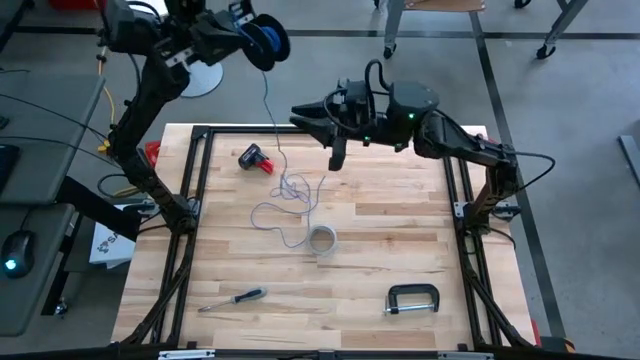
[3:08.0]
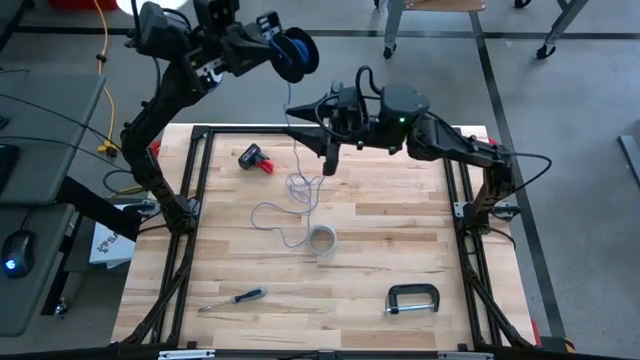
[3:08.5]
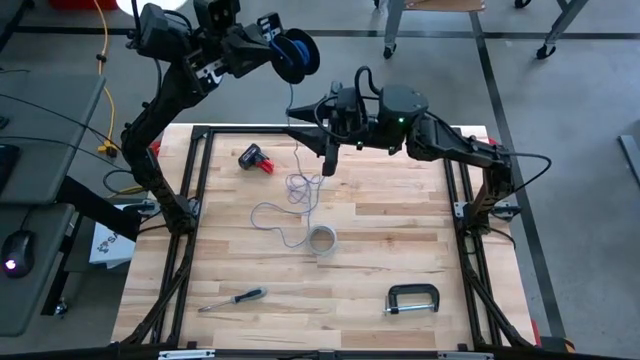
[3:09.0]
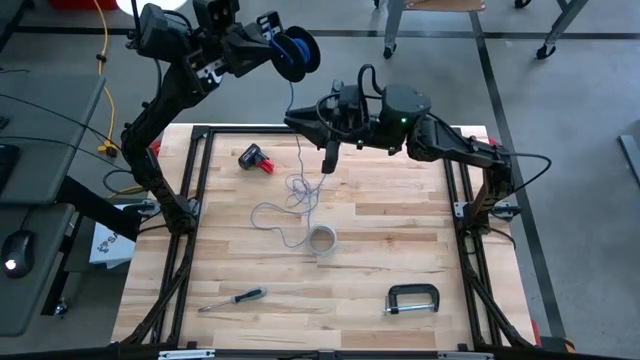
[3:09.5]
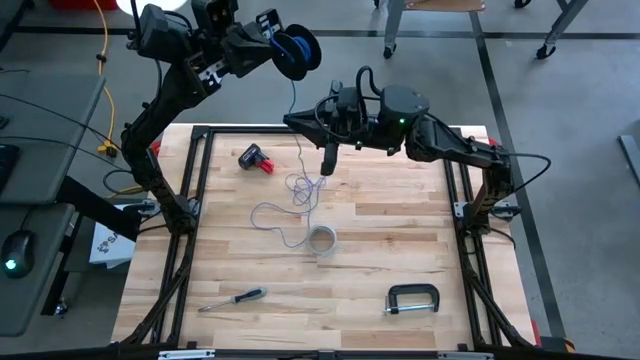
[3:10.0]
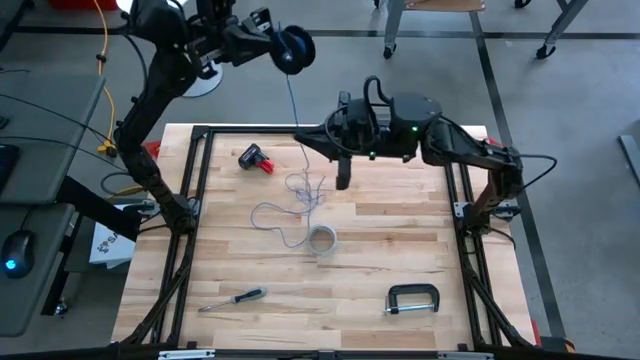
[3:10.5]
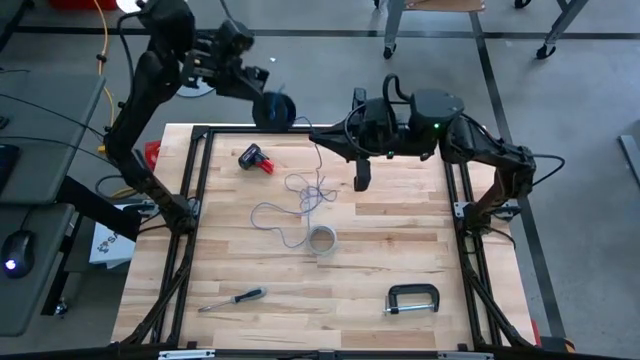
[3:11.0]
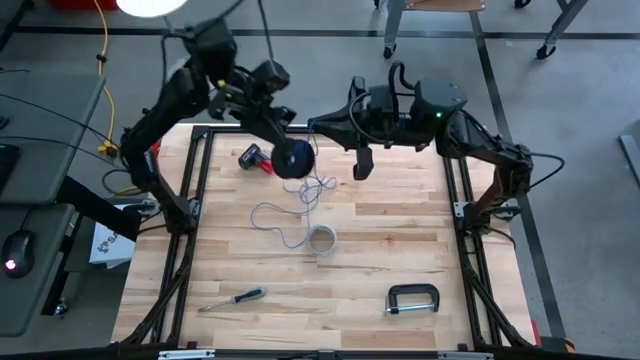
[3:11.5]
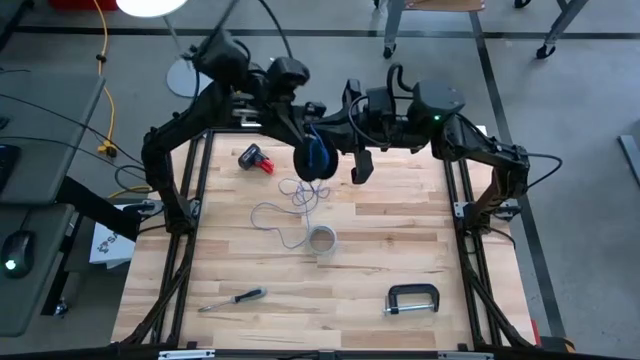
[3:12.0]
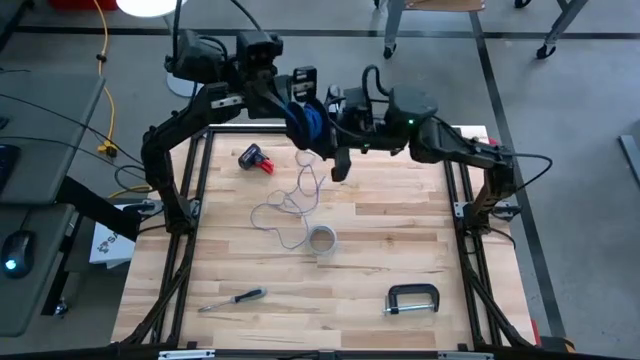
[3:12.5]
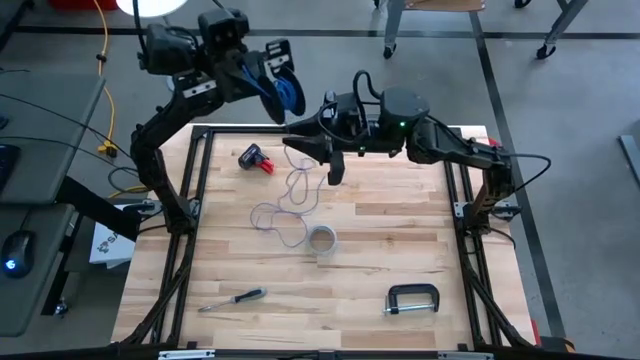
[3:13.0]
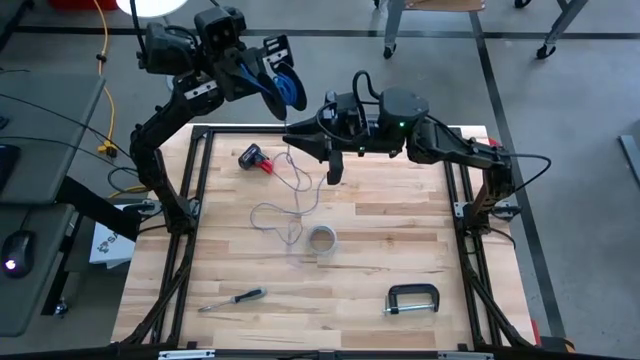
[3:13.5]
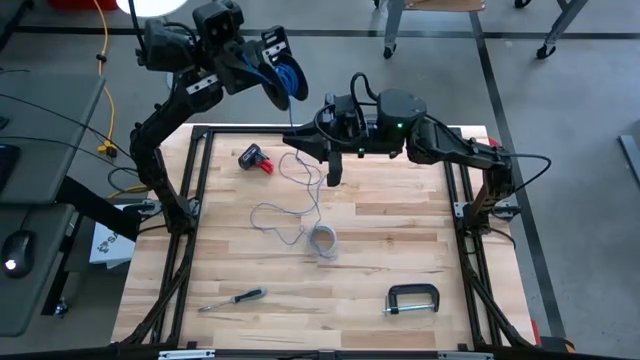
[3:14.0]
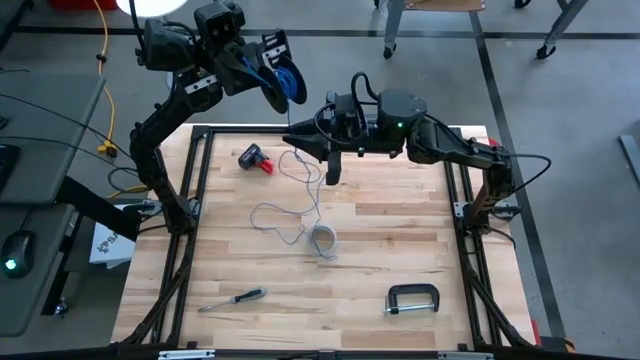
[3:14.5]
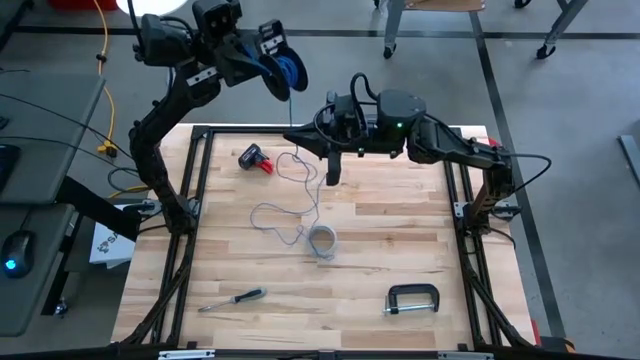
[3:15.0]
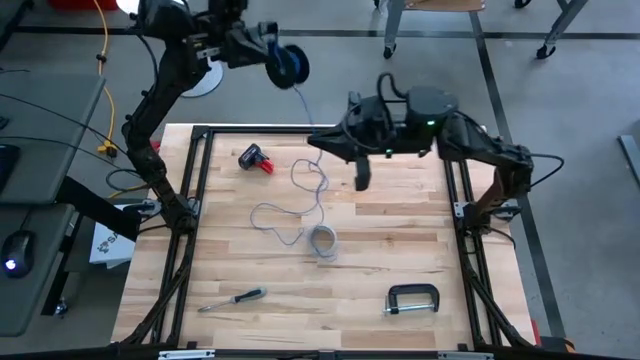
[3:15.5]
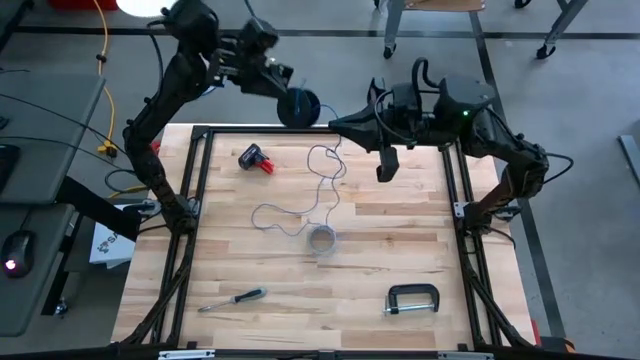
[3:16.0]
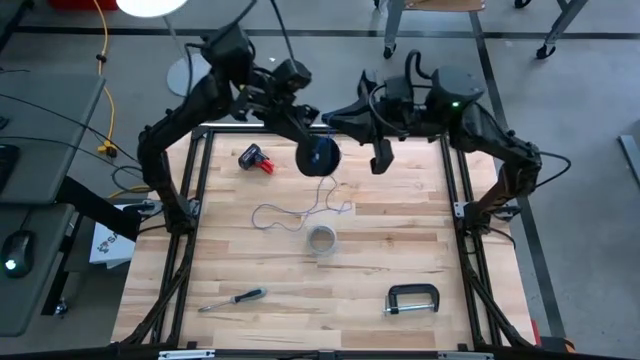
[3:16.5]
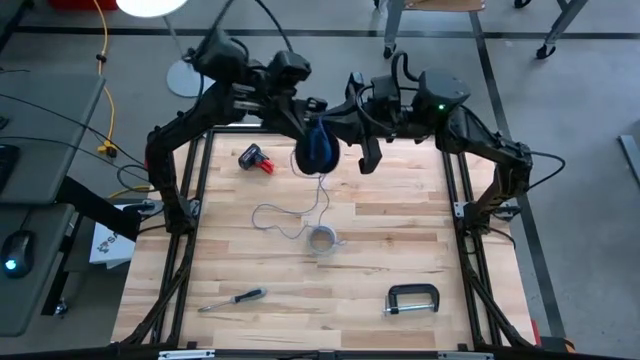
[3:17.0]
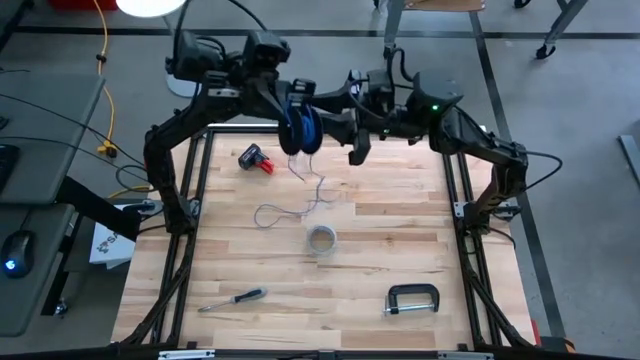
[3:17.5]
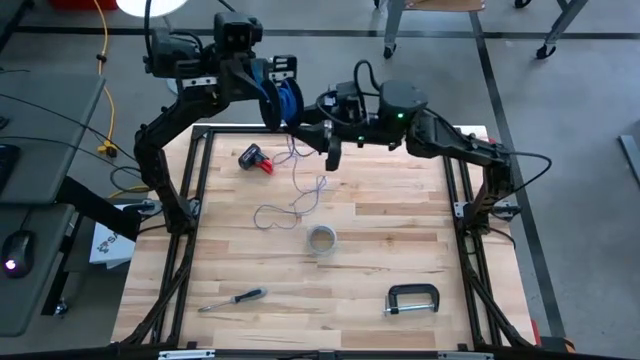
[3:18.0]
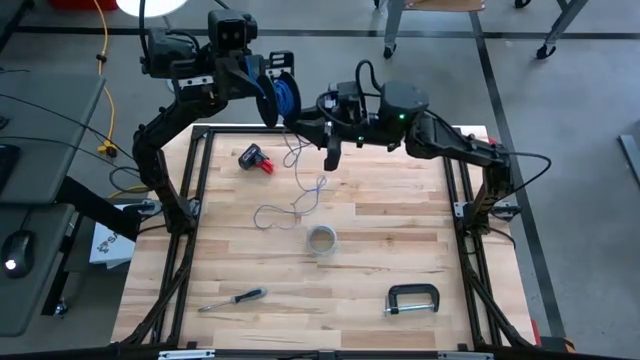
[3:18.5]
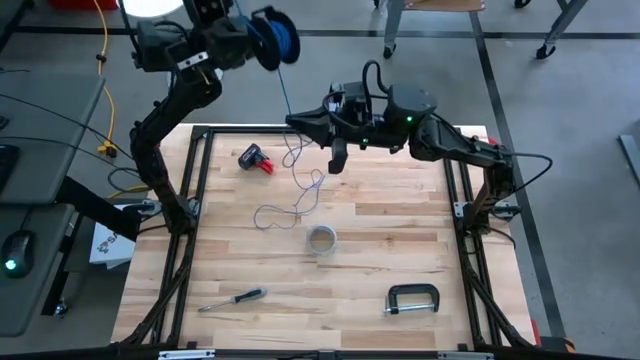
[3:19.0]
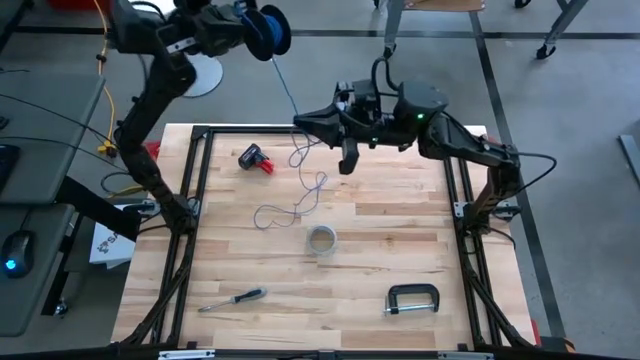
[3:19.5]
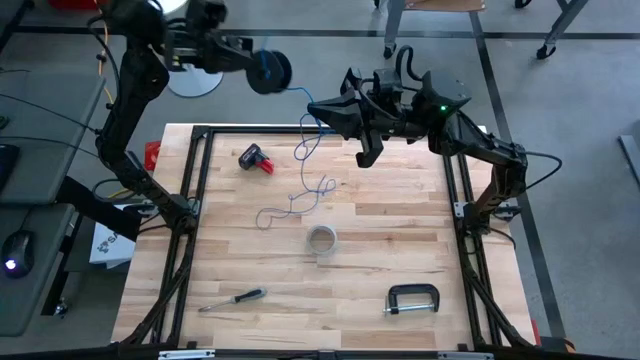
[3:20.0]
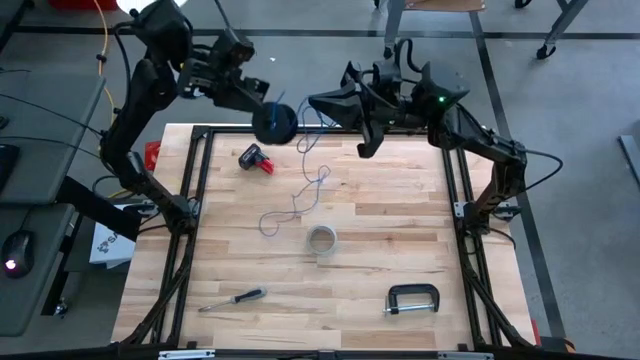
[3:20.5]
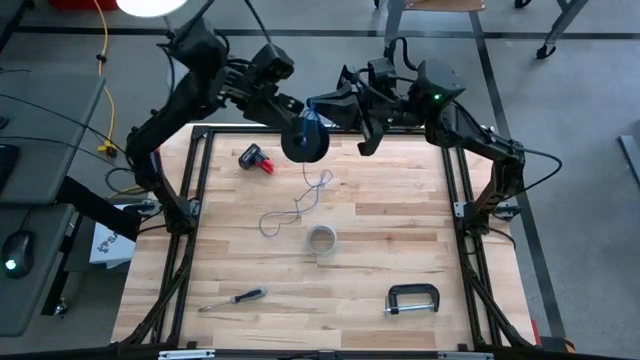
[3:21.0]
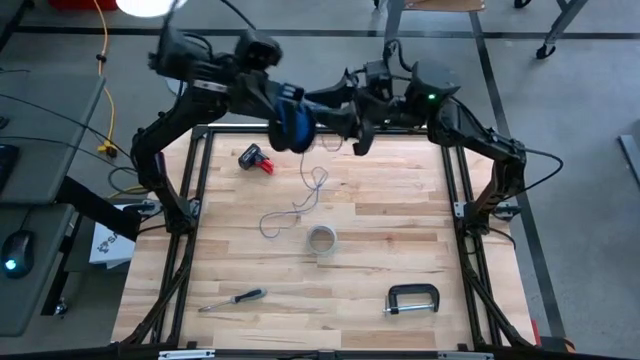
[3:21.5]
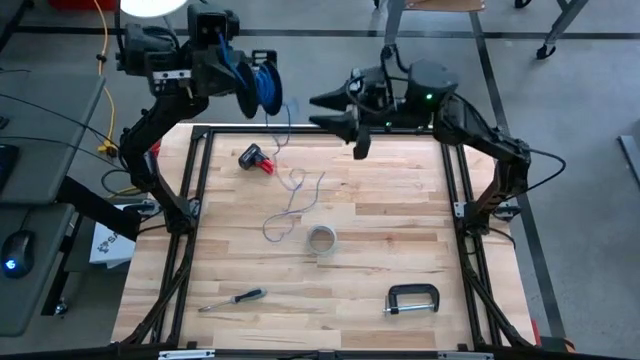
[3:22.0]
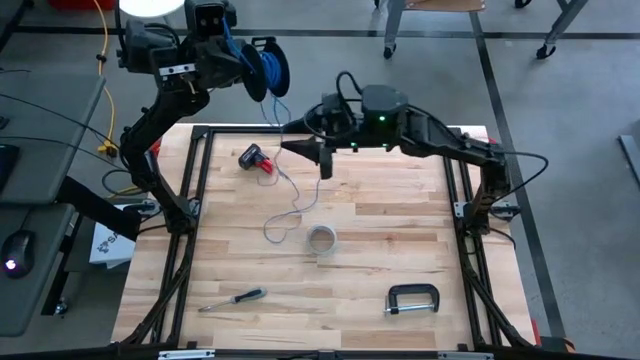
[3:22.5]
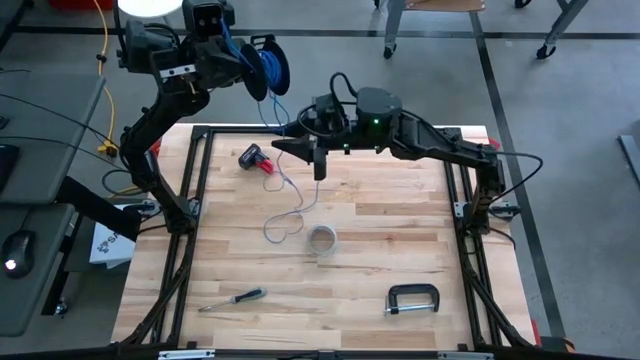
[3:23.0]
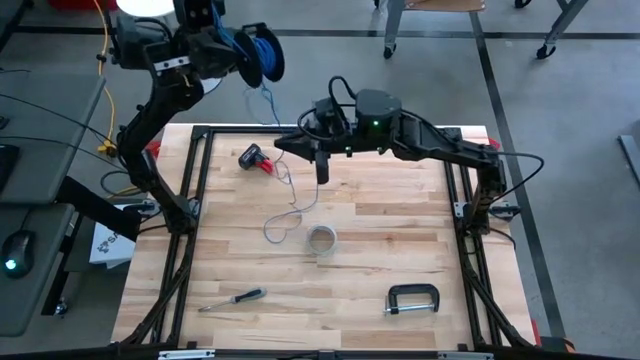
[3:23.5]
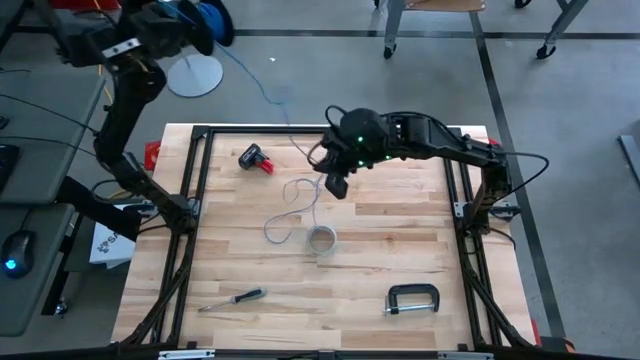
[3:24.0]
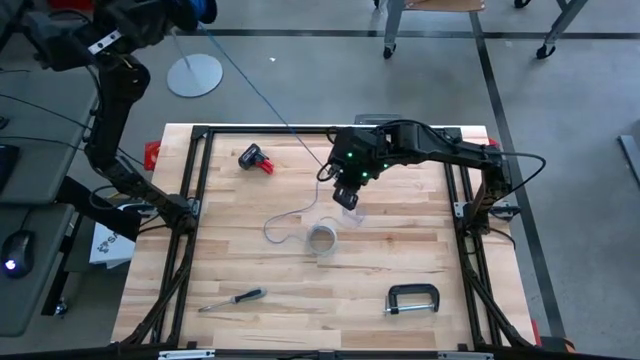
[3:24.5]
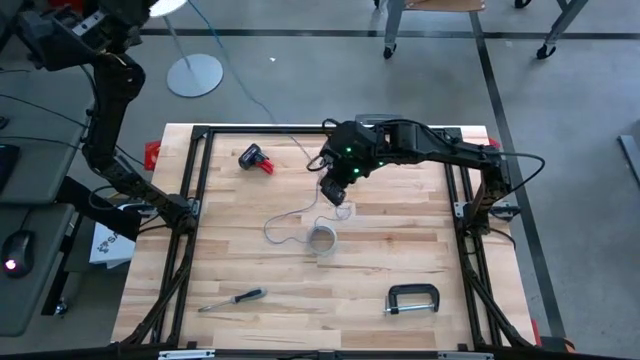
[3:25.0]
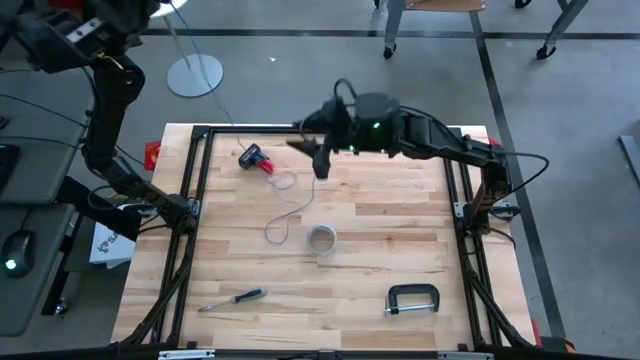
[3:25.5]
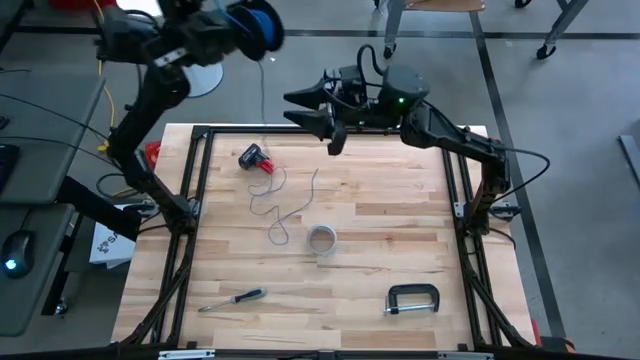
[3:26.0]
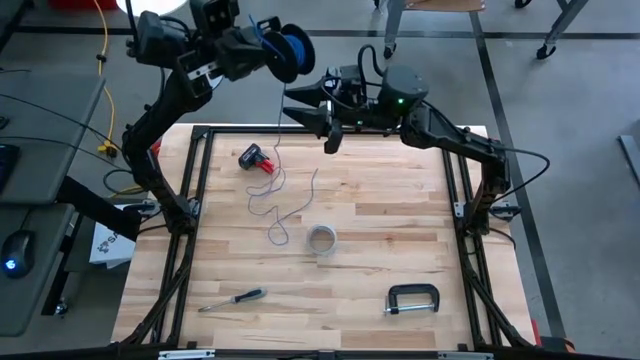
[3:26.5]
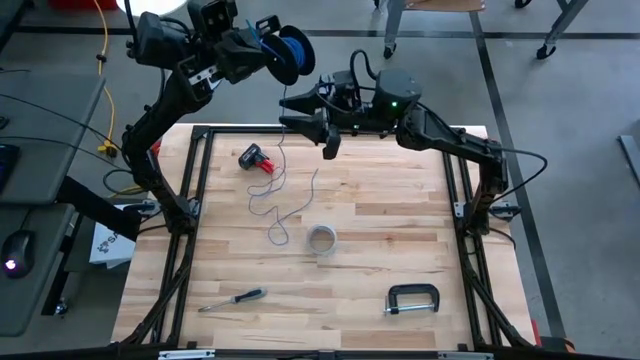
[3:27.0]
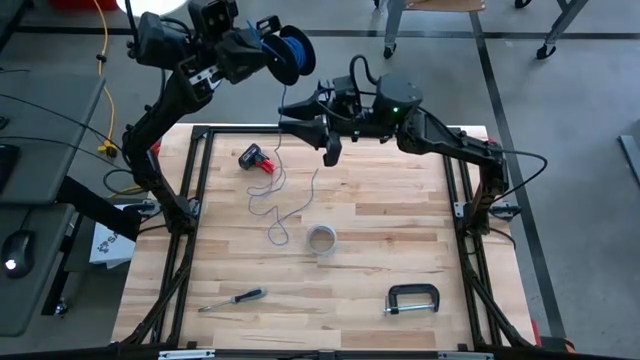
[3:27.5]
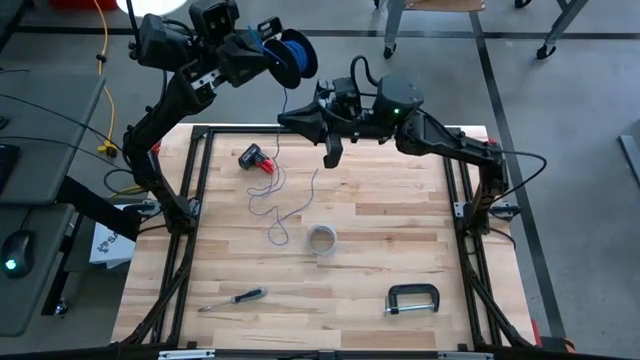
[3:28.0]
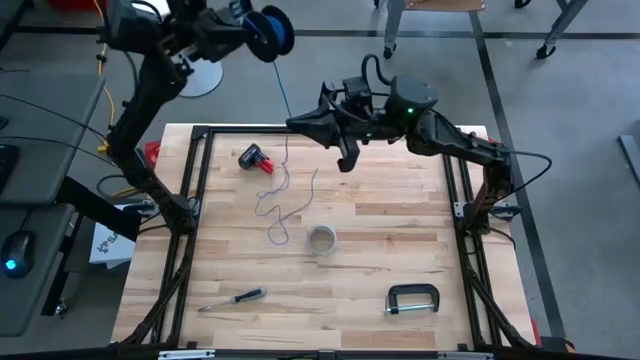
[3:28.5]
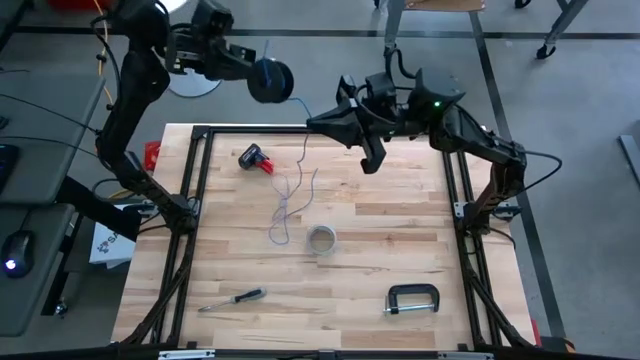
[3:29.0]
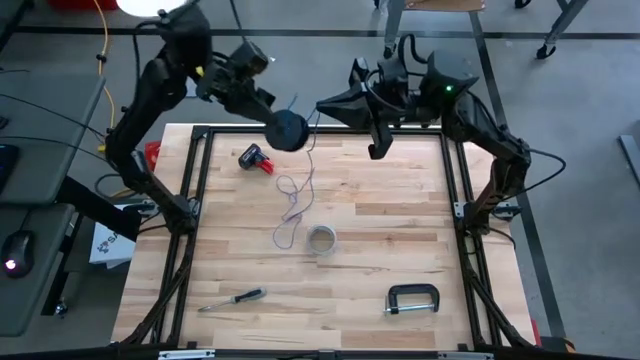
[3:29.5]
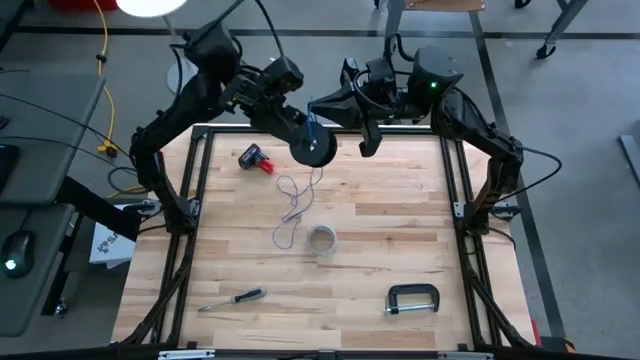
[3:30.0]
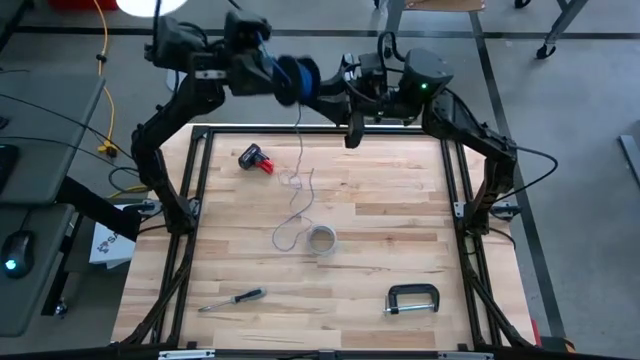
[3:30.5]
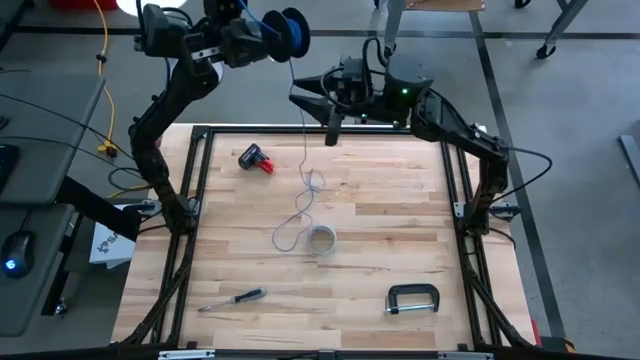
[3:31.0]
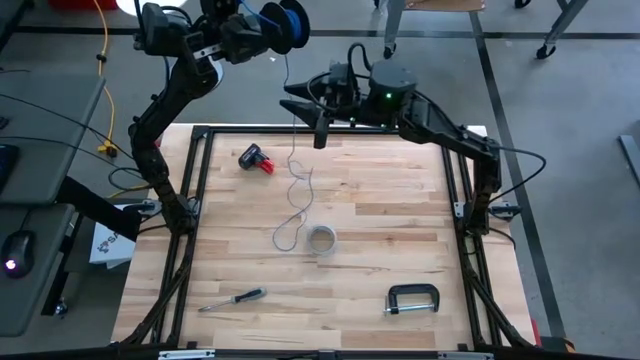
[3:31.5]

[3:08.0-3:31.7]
Task: Coil cords
Coil the blue wire on the spool
